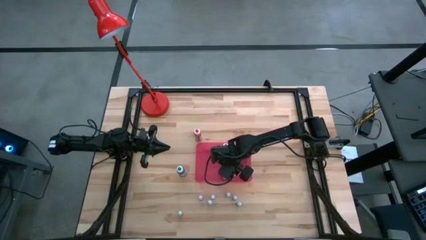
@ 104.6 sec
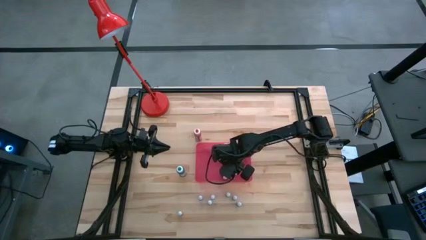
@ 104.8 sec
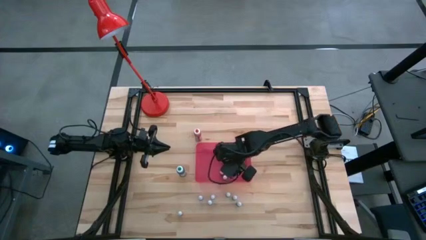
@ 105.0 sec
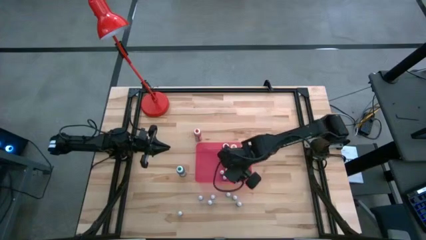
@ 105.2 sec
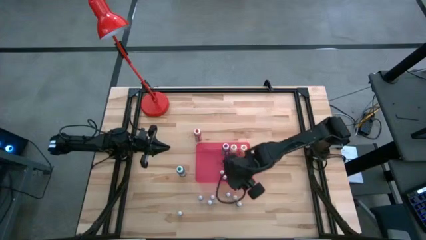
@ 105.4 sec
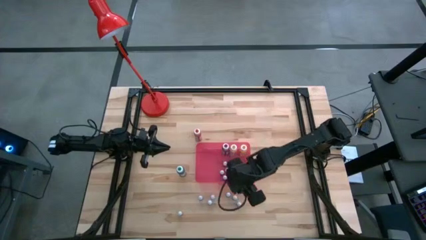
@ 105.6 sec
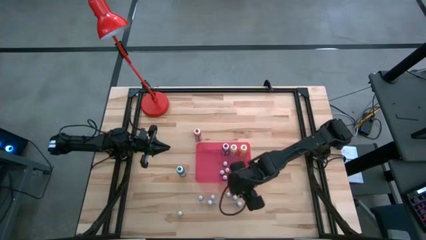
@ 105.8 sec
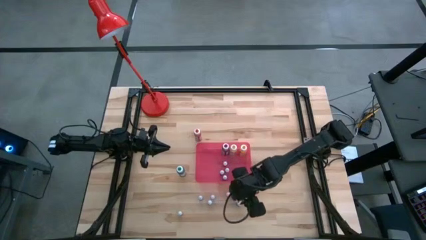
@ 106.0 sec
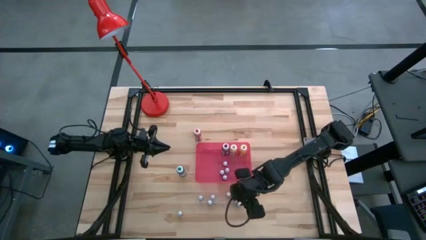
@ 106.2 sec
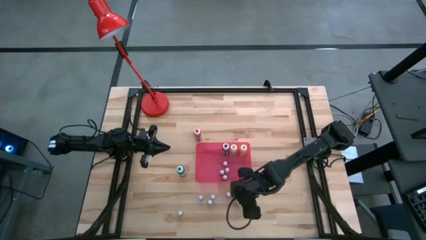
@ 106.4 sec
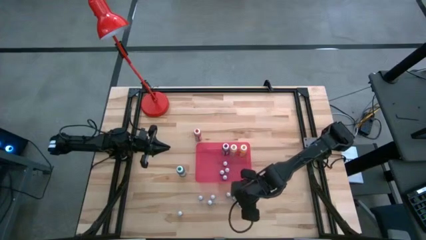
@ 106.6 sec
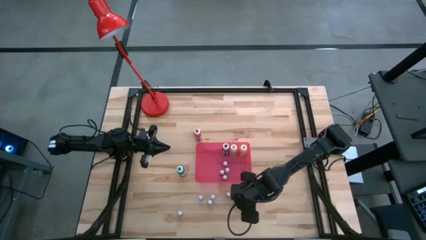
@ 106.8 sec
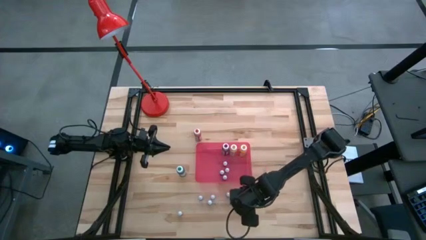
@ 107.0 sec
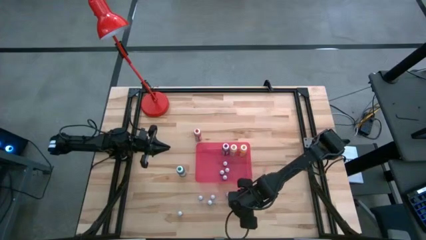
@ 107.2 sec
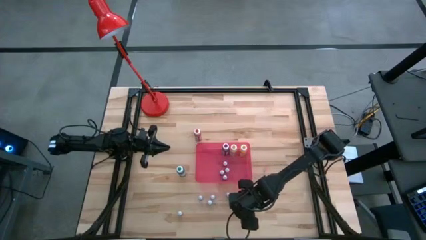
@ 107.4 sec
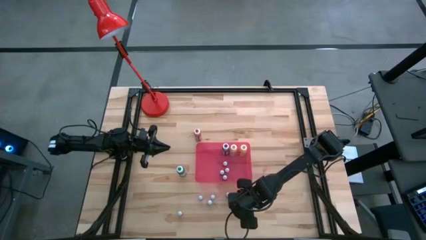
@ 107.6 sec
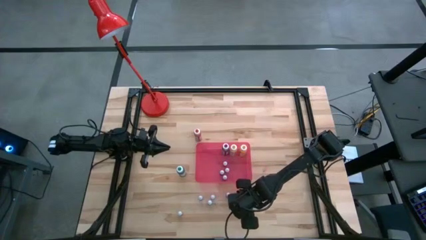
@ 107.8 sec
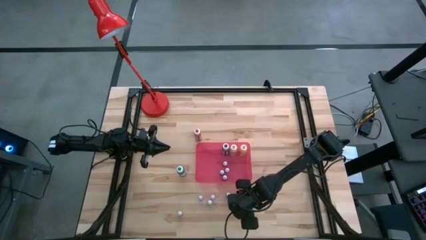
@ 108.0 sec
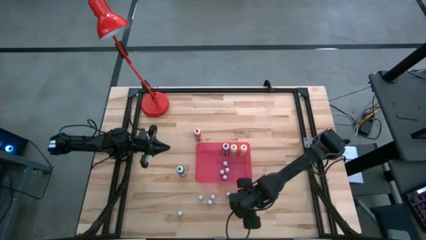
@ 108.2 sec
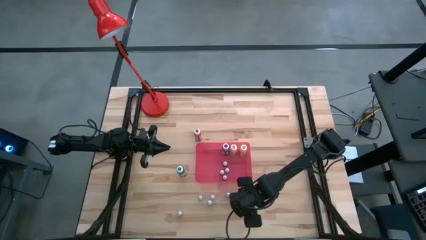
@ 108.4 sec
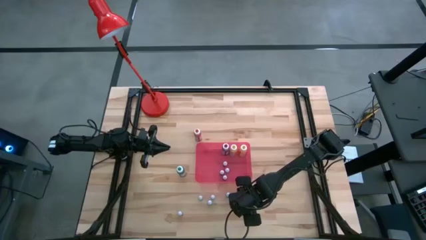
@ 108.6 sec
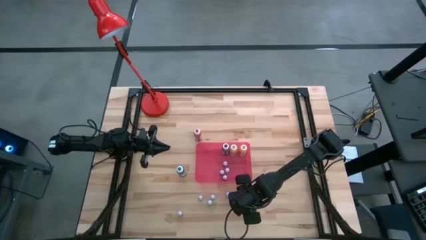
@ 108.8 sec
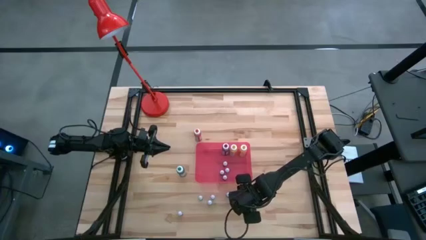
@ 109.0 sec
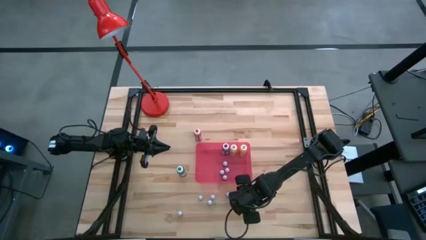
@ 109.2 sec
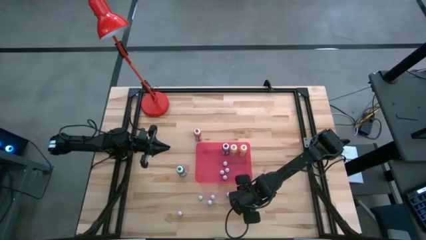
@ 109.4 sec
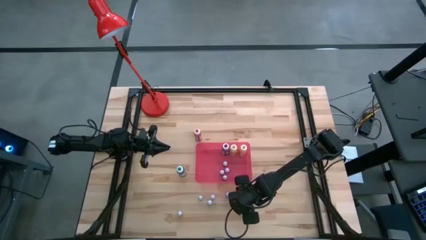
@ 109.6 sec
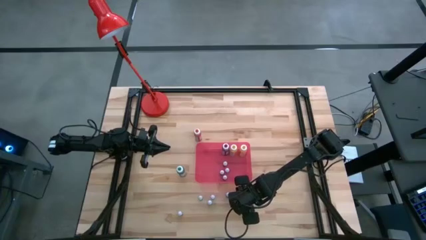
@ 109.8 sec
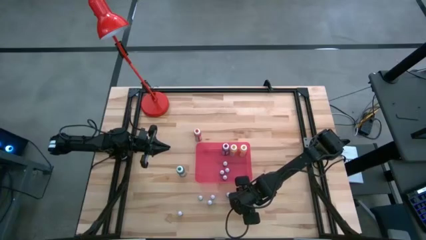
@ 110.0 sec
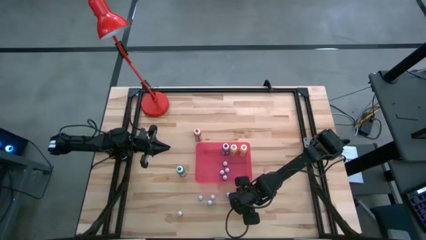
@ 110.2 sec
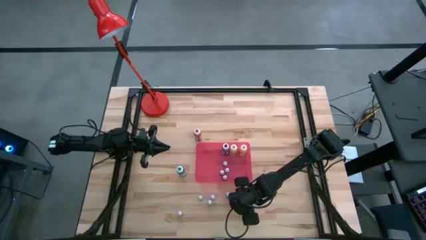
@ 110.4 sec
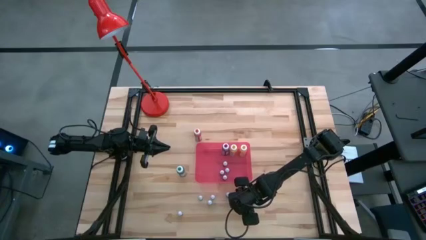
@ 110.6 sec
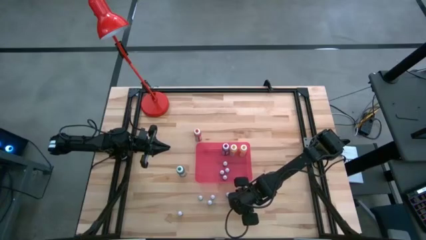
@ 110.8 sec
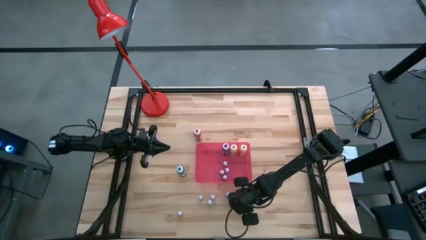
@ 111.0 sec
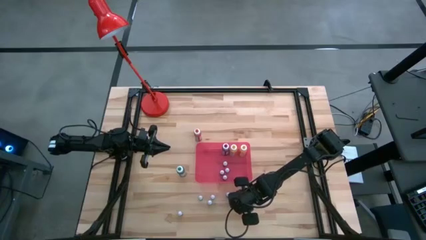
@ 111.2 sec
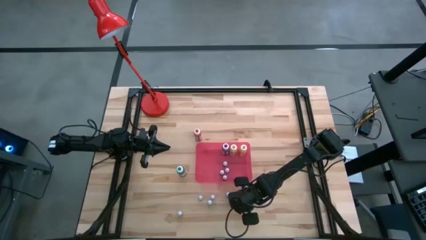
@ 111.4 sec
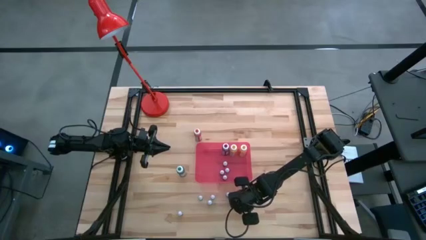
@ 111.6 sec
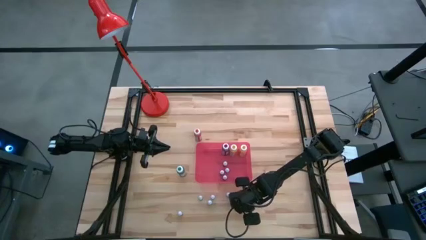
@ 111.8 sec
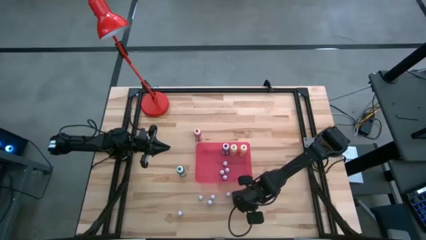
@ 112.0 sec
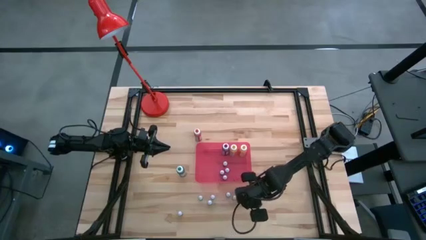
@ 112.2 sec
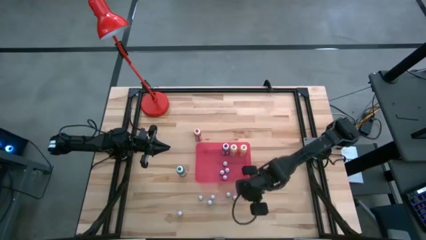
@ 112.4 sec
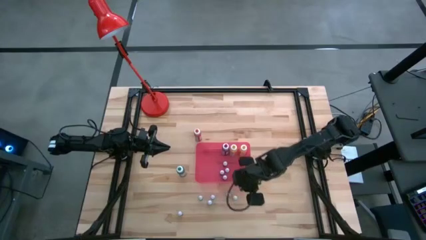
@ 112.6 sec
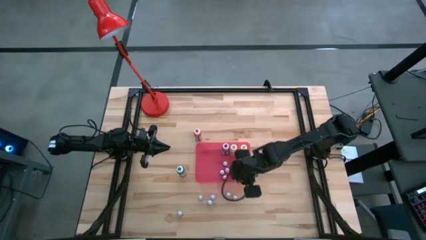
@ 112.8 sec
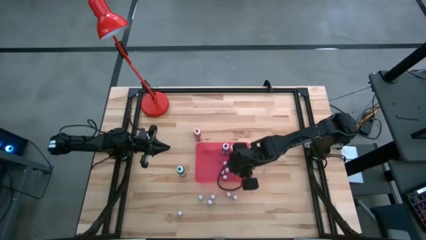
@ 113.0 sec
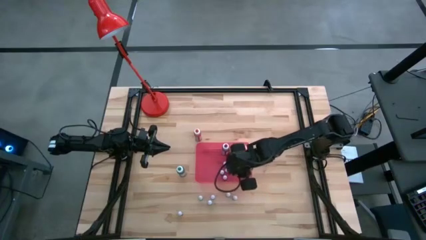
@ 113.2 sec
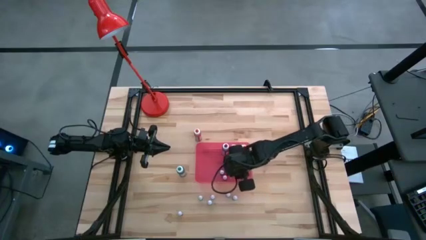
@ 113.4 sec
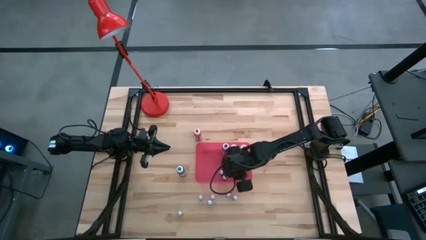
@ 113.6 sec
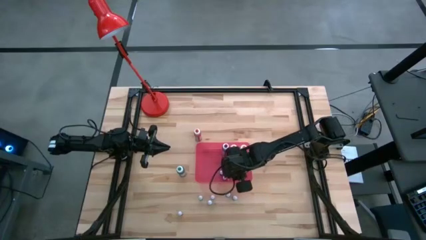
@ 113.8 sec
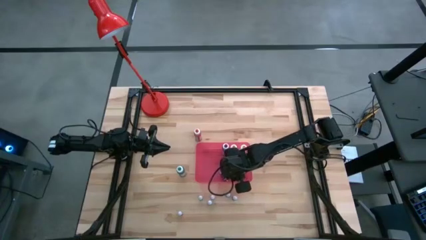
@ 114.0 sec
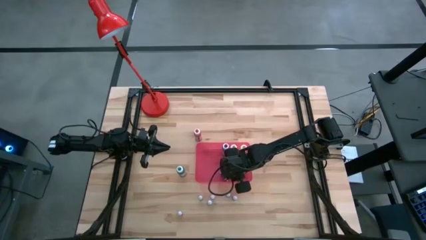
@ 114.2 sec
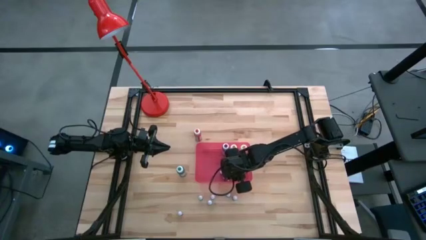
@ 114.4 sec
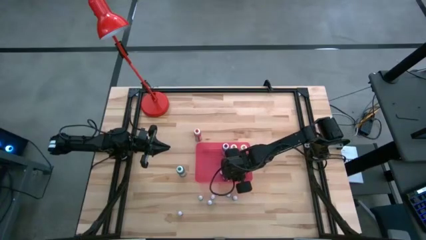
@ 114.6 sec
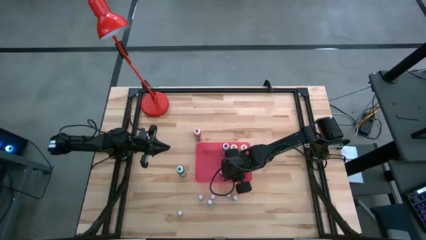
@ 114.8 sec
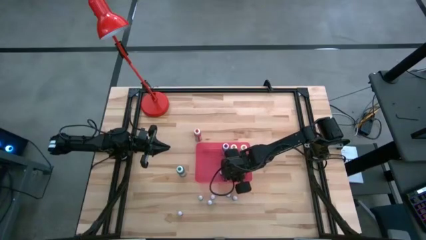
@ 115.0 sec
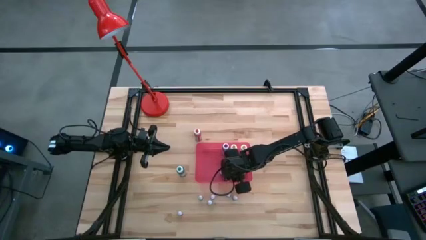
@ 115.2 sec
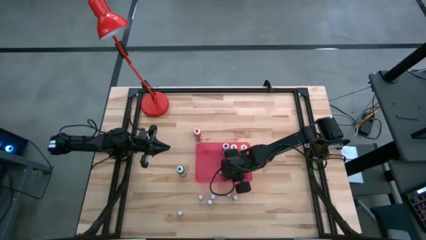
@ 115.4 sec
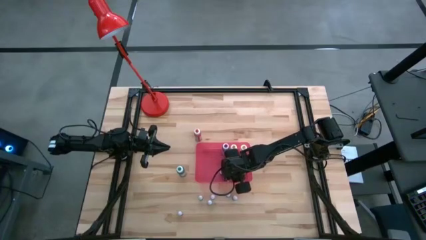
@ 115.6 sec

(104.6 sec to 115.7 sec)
Task: Pick & Place food coloring
Put the bottom right small green food coloring bottle into the container

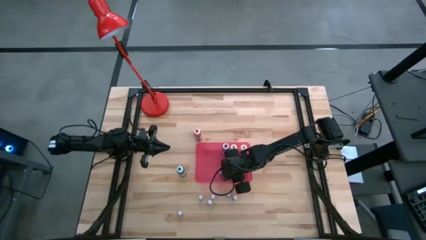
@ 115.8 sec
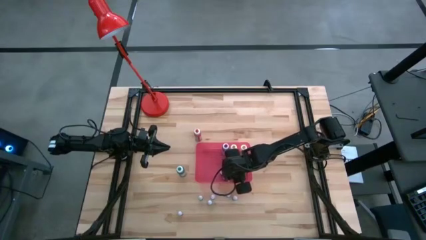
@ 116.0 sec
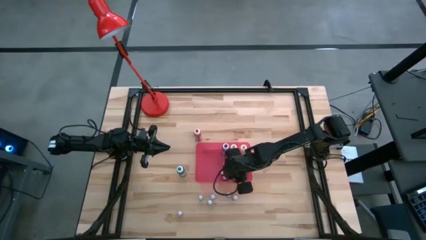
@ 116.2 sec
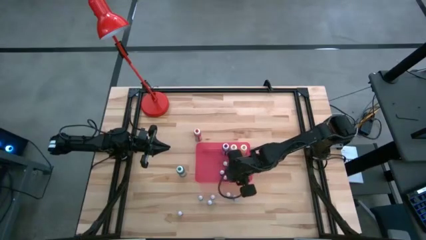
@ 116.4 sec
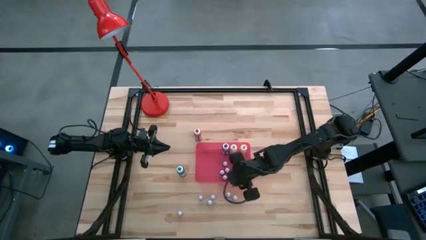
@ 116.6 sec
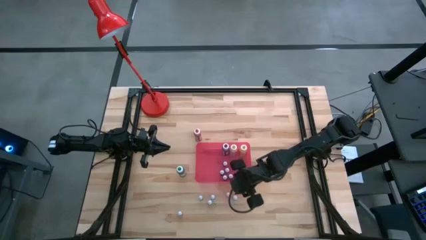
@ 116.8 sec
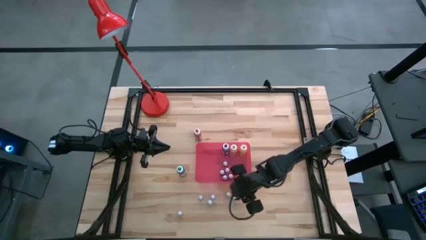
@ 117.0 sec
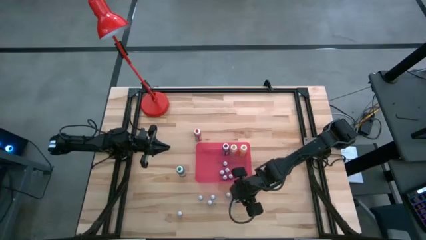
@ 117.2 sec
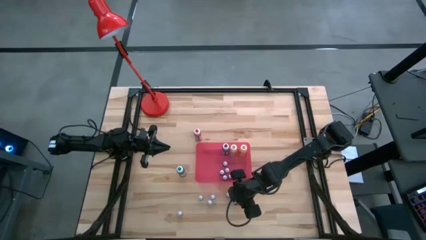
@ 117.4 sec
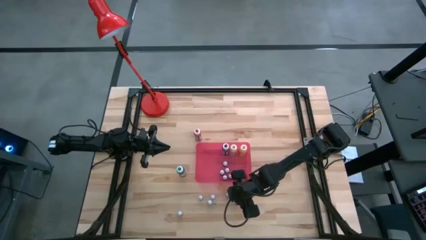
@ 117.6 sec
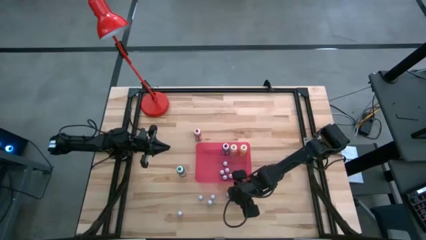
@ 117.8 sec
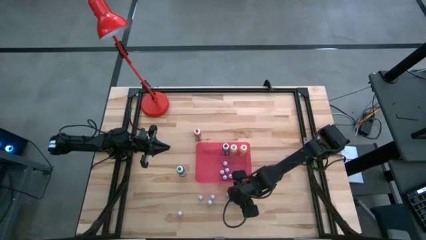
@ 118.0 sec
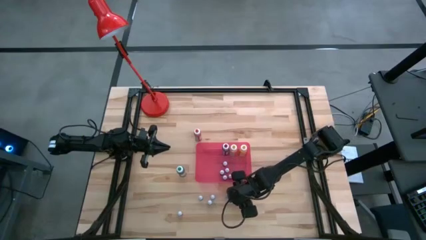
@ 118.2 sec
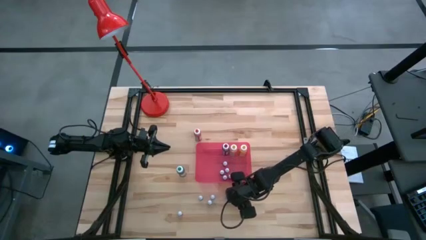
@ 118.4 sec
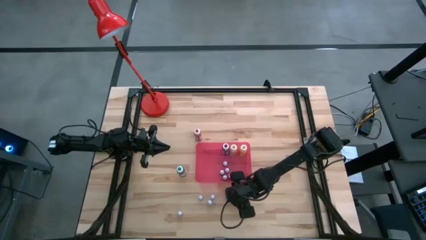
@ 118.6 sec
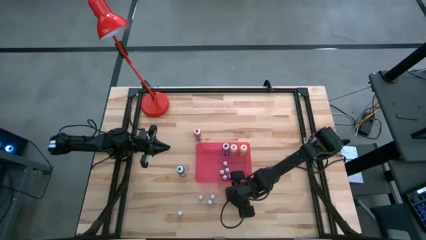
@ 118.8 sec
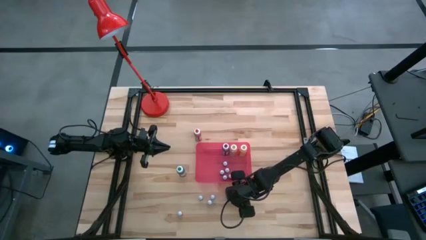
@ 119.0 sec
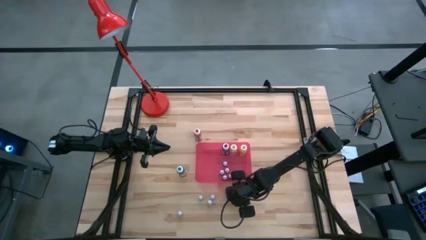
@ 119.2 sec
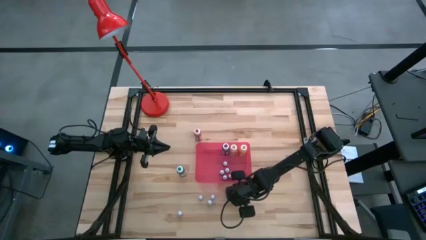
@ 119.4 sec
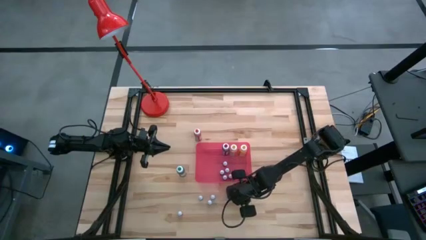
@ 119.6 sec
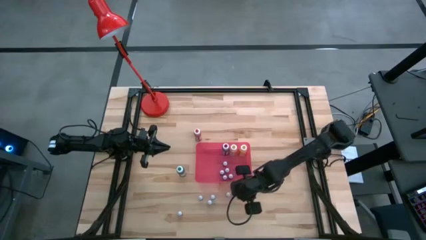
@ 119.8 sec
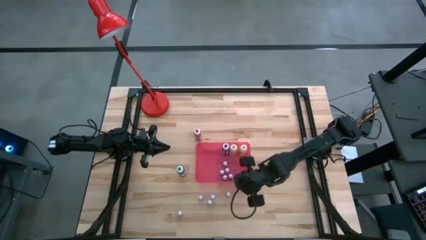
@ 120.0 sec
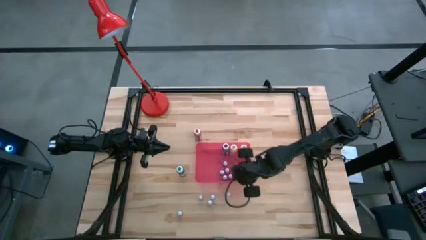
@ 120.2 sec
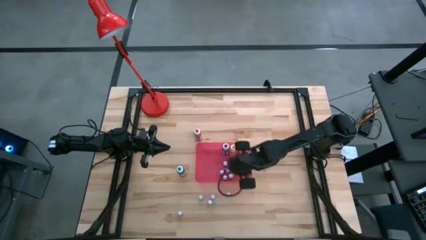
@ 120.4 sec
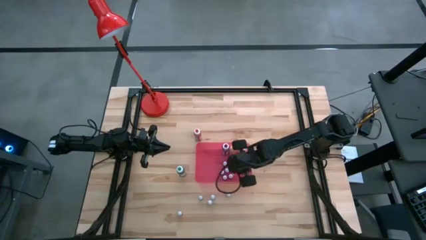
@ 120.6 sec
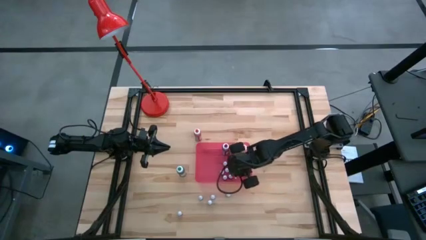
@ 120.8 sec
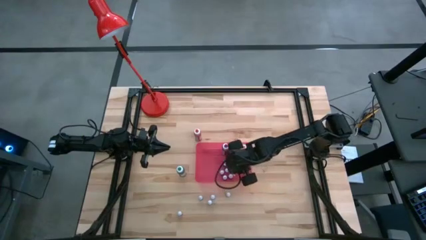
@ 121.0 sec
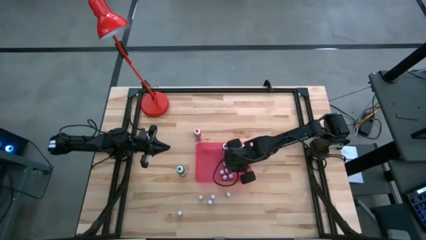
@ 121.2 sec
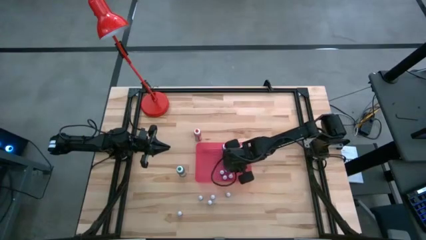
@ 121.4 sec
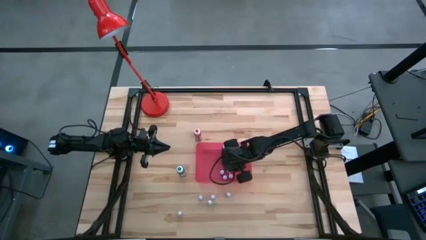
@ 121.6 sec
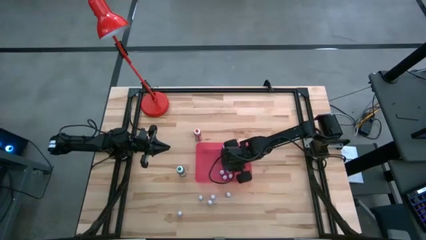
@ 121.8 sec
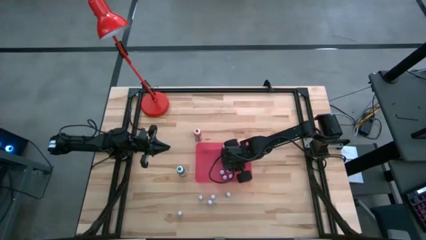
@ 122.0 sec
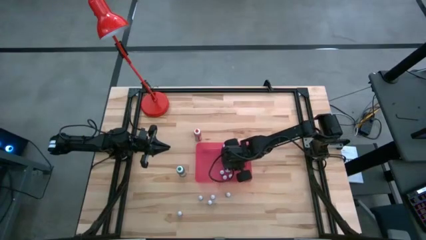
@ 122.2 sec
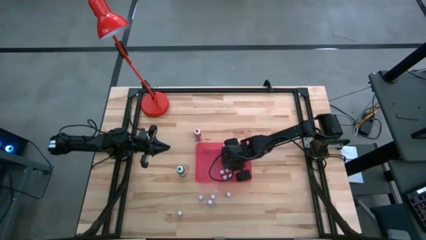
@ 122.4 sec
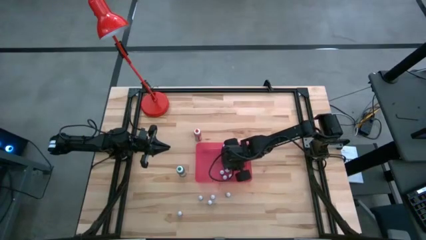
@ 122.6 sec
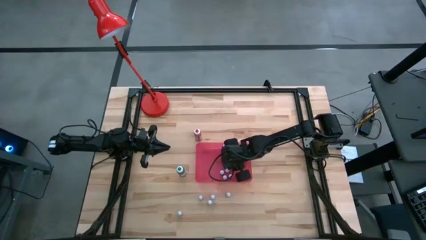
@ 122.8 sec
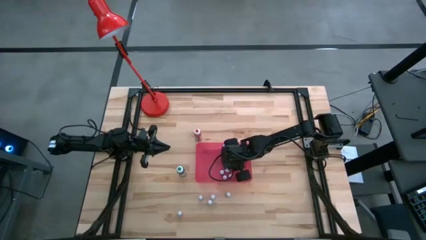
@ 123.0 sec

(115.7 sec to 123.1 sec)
Put the right small blue food coloring bottle into the container
